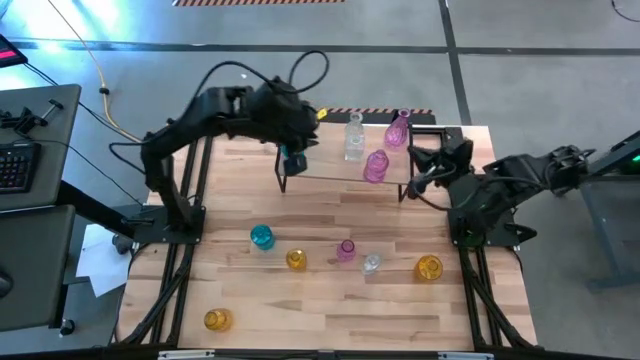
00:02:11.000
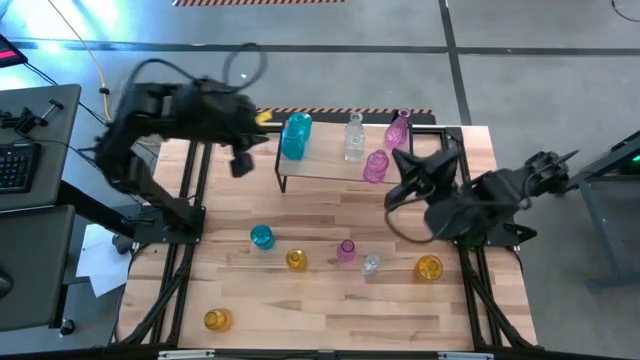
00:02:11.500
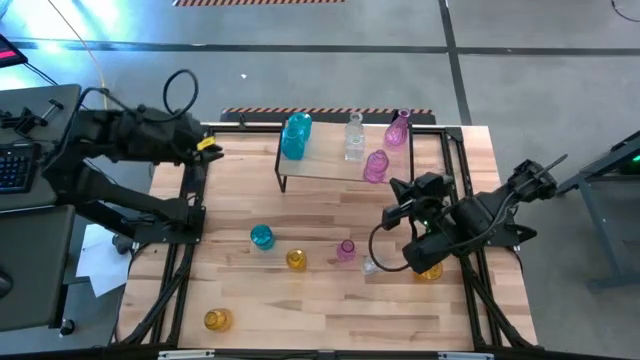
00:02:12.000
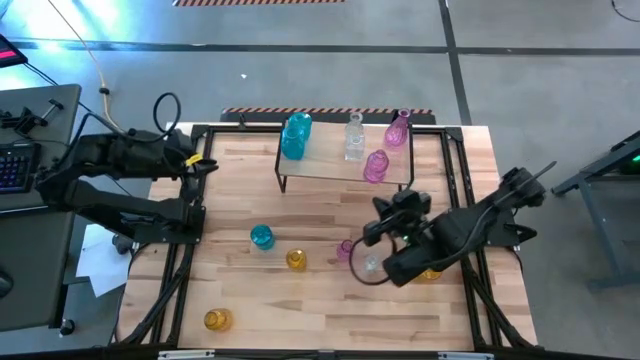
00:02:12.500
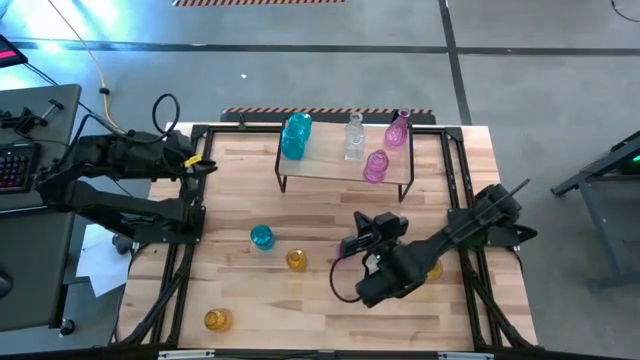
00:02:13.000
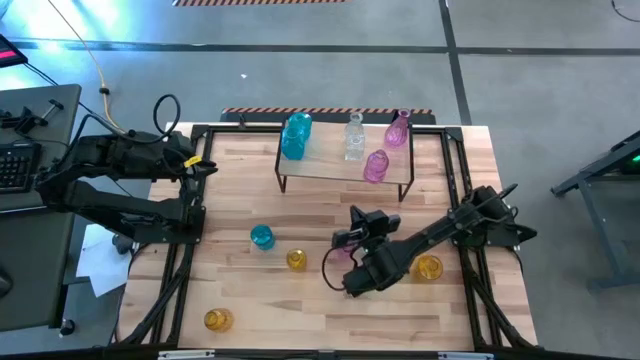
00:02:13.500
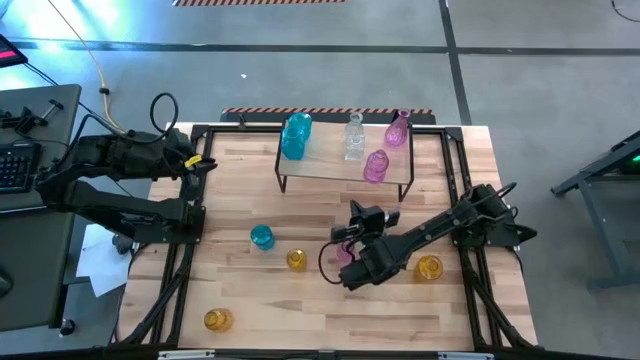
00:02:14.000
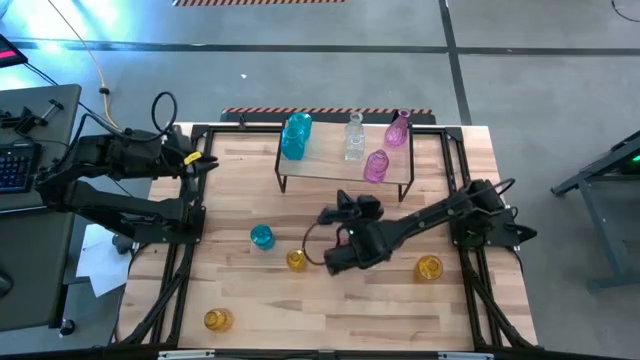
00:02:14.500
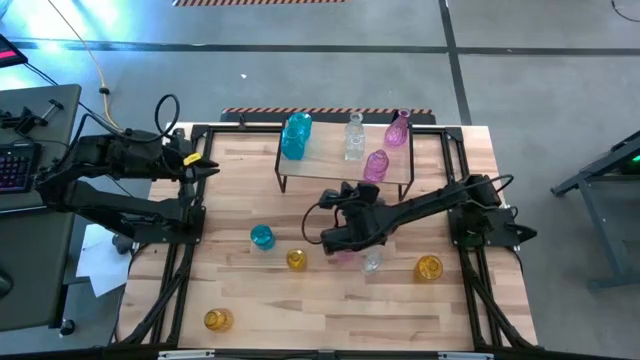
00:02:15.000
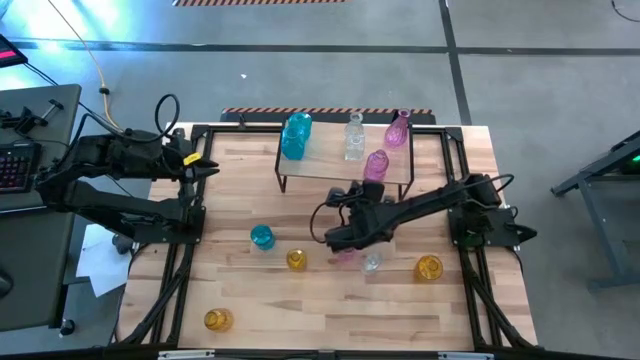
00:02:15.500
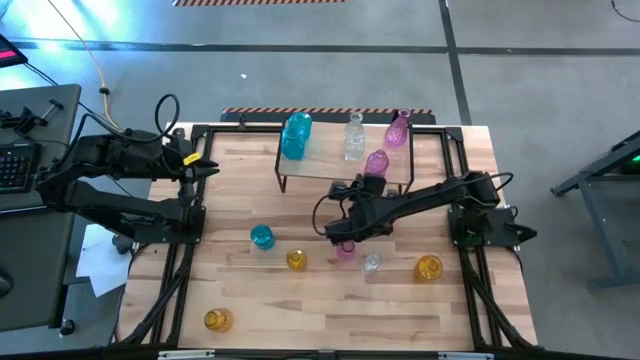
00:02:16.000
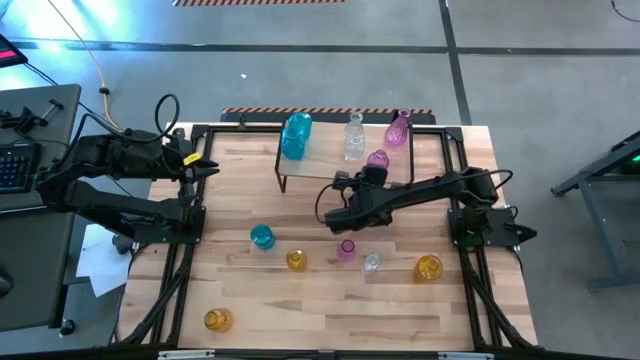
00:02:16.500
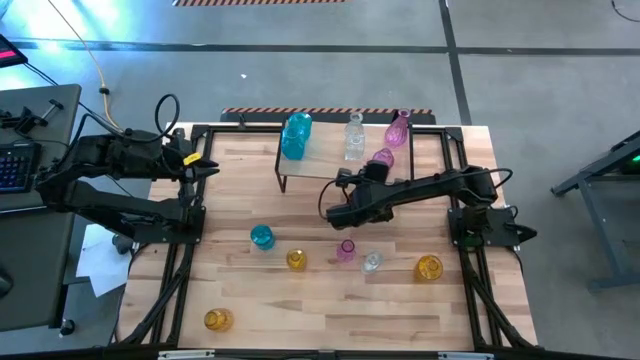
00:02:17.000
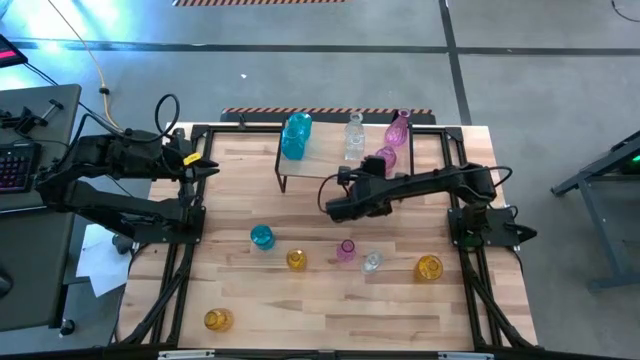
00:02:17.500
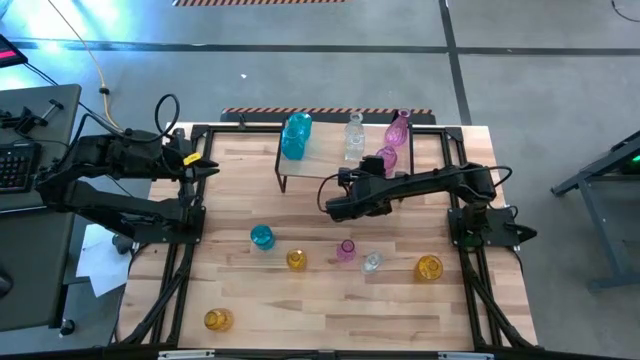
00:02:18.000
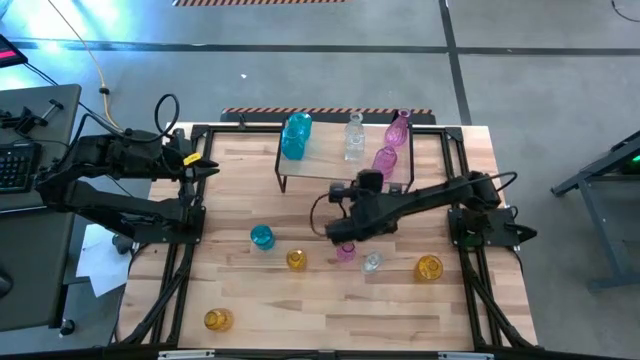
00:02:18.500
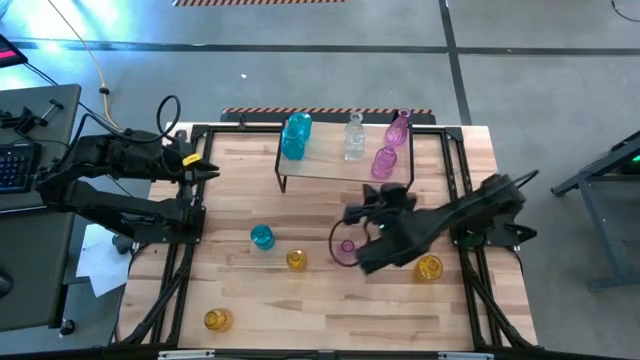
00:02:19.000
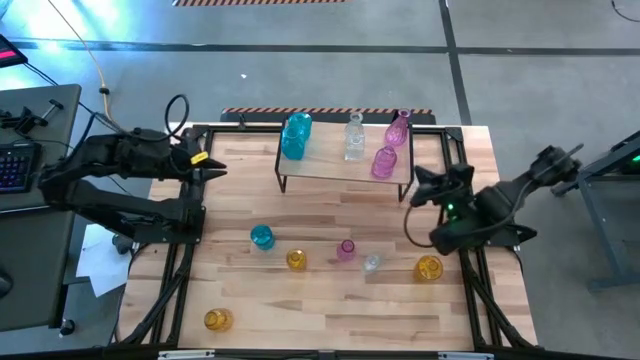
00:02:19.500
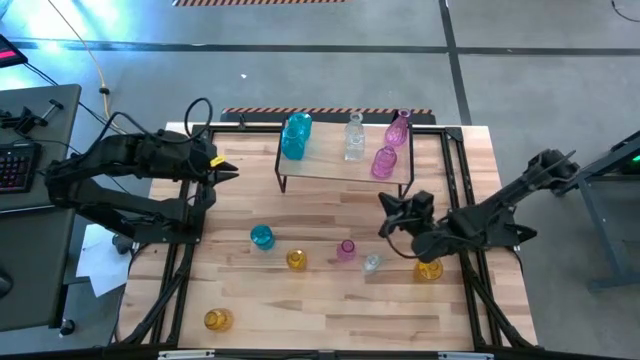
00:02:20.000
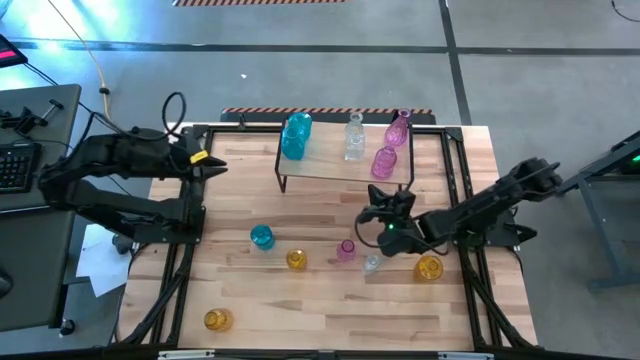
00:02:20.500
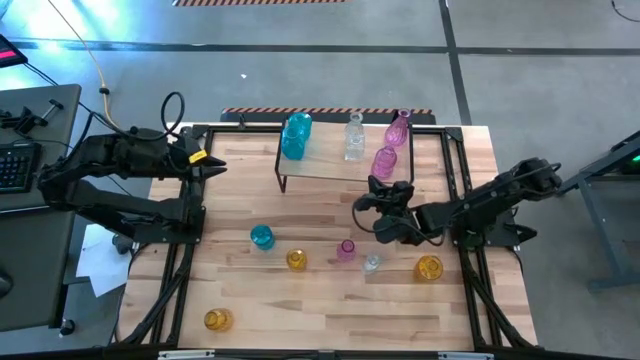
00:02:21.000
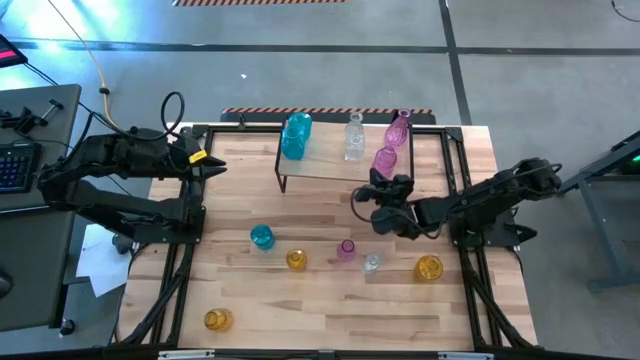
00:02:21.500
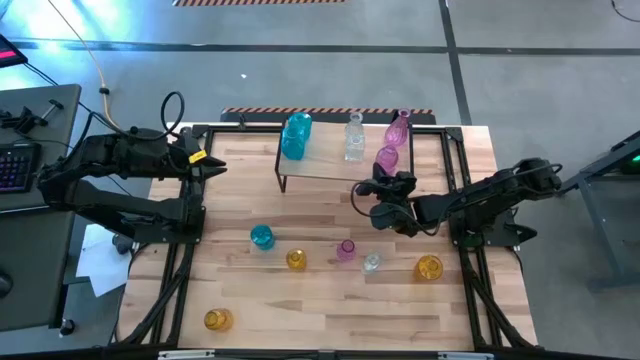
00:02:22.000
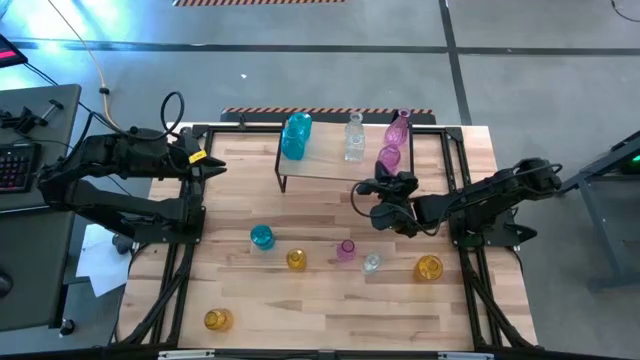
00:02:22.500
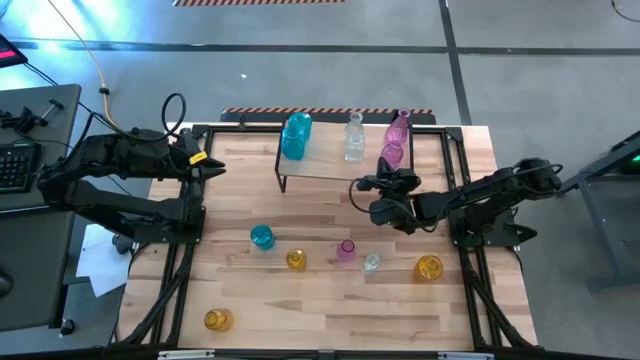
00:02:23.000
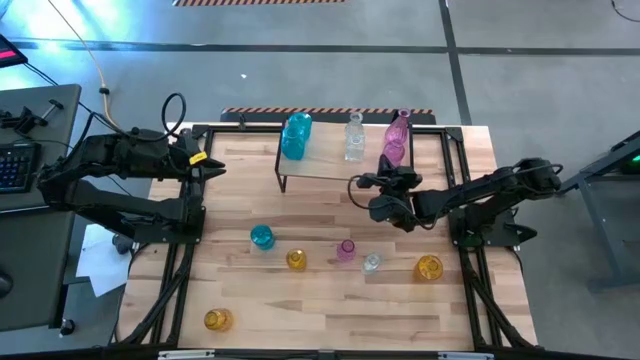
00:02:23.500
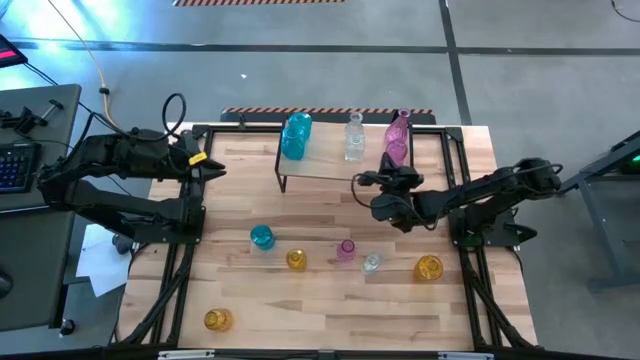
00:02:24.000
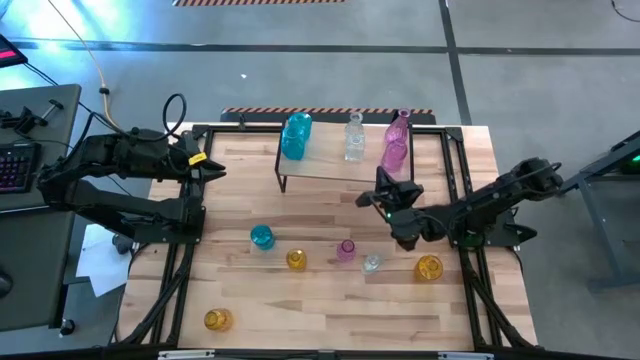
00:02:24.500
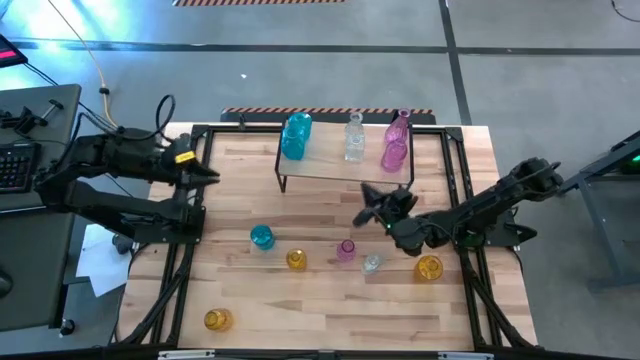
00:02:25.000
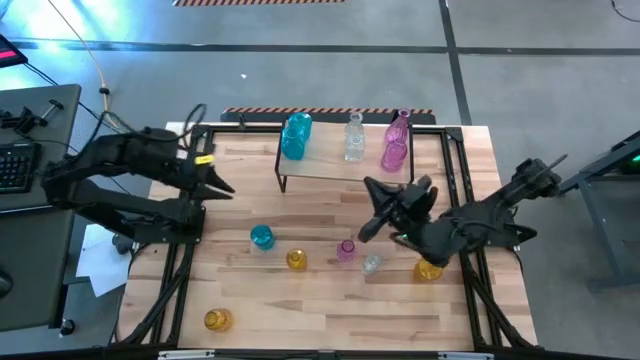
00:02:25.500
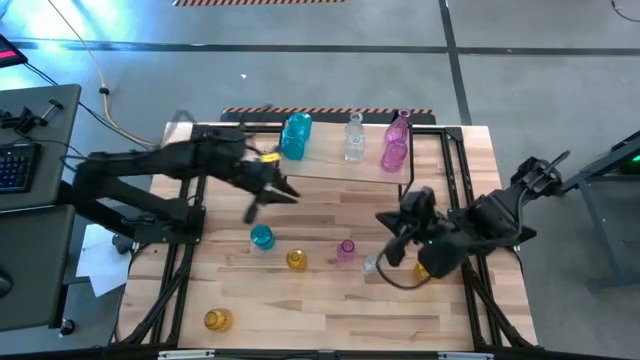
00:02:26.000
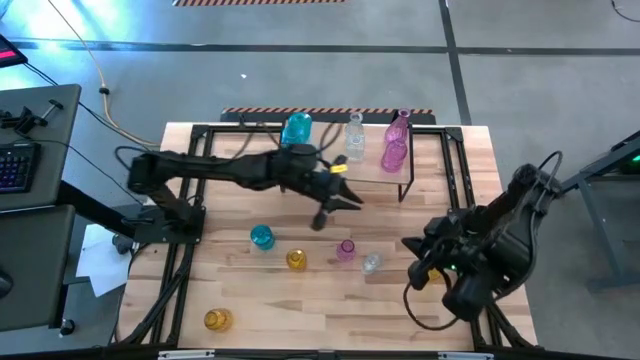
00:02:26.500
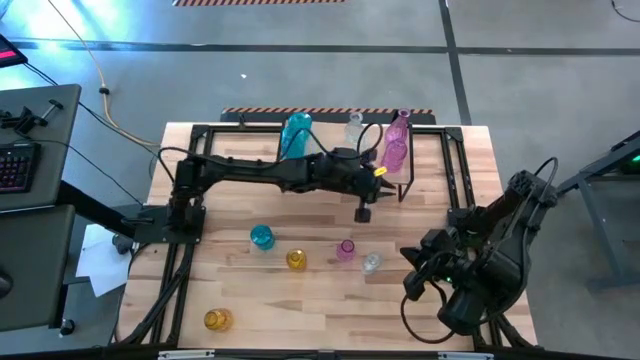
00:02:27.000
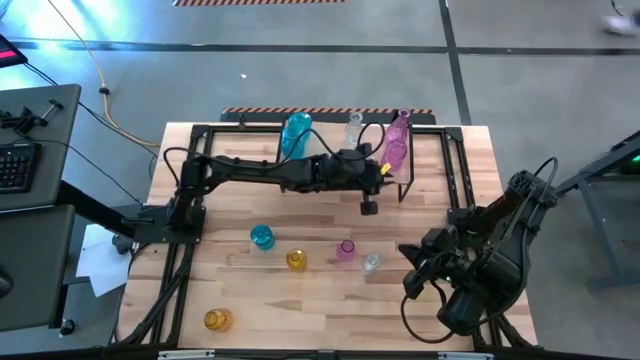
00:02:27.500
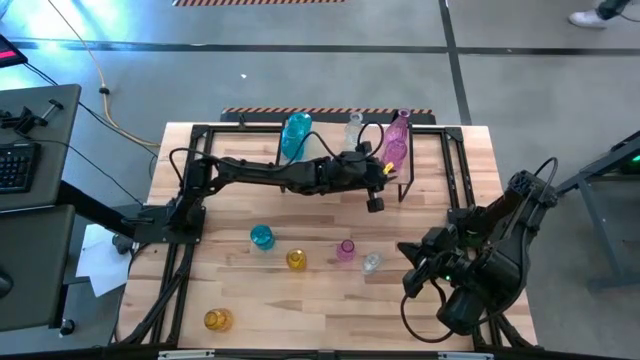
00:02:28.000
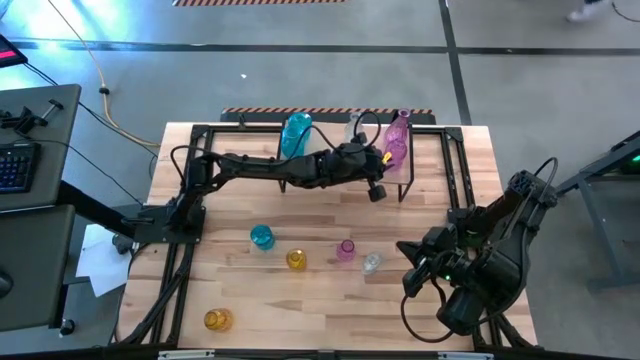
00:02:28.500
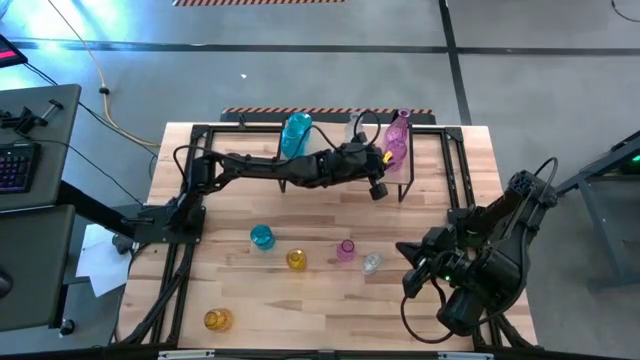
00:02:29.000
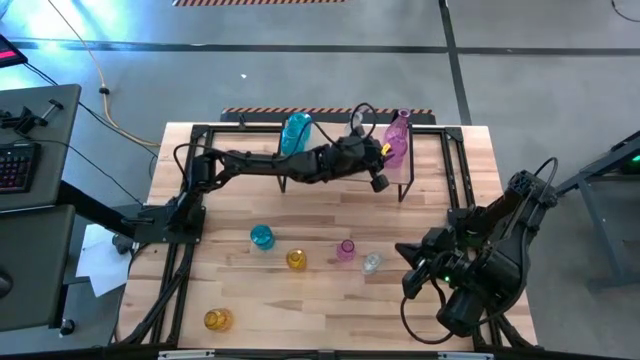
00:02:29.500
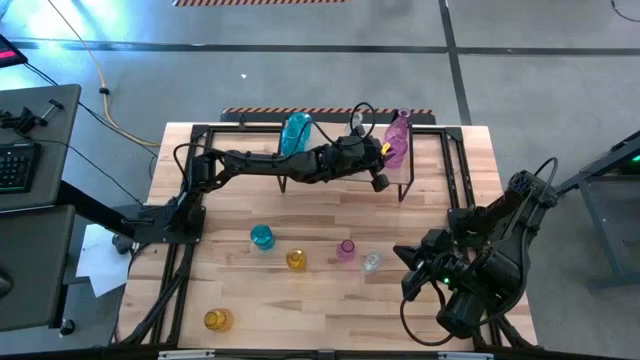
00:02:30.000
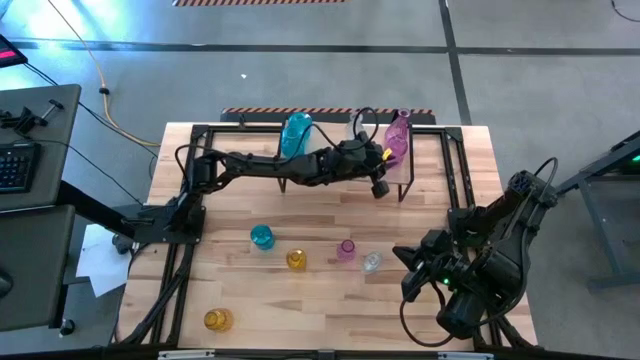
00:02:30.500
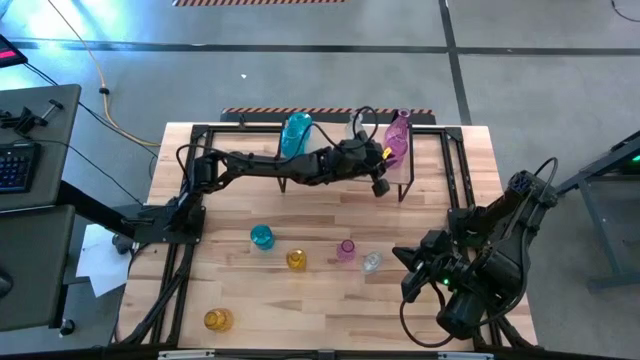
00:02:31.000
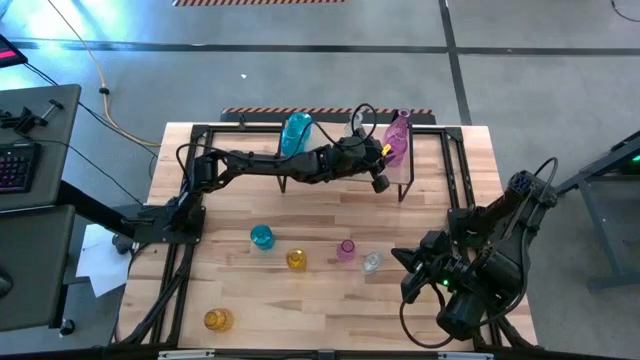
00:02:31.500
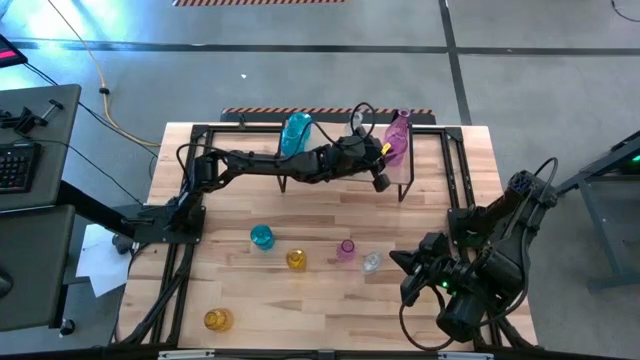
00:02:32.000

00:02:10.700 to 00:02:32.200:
Task: sort vases onto shelf
Put the top purple vase on the shelf aligned with the other purple vase
